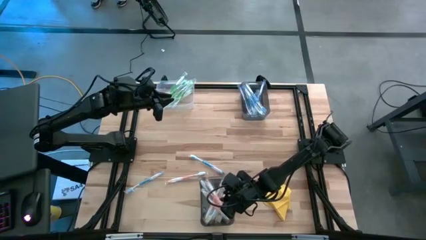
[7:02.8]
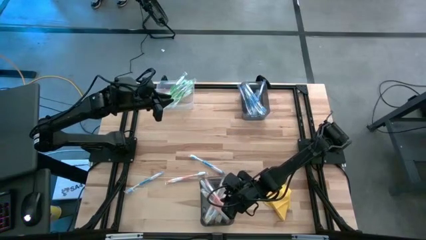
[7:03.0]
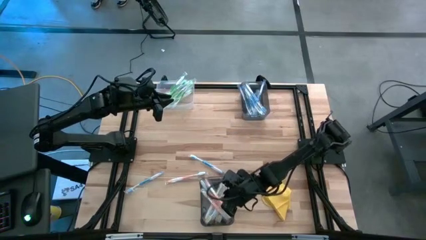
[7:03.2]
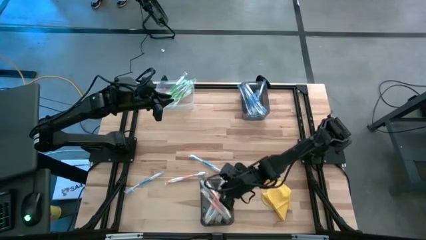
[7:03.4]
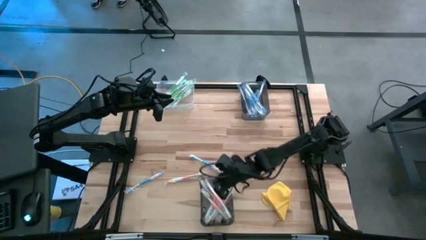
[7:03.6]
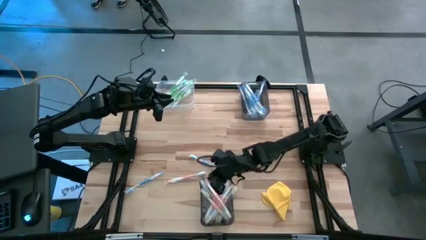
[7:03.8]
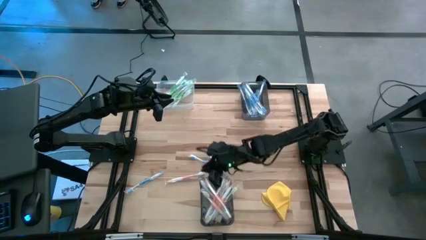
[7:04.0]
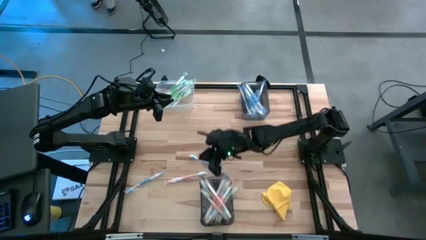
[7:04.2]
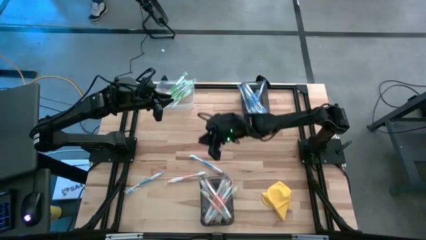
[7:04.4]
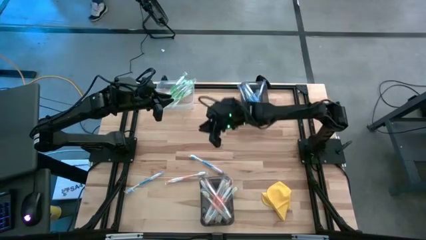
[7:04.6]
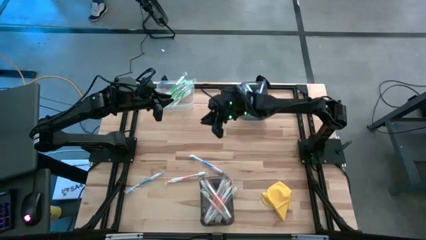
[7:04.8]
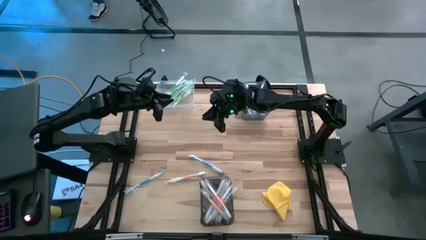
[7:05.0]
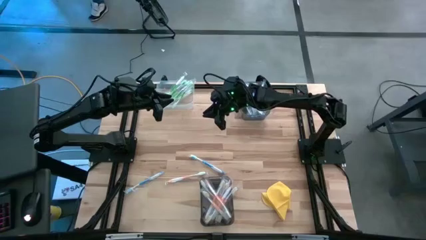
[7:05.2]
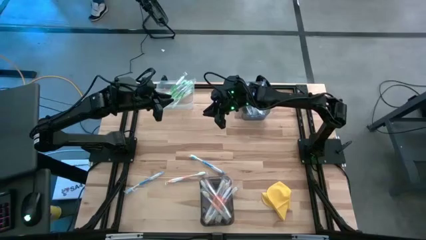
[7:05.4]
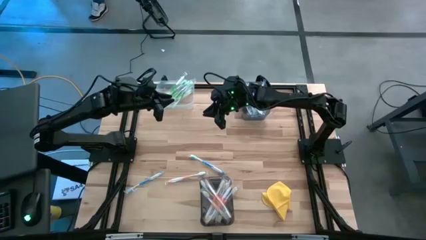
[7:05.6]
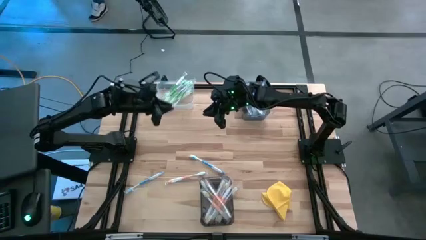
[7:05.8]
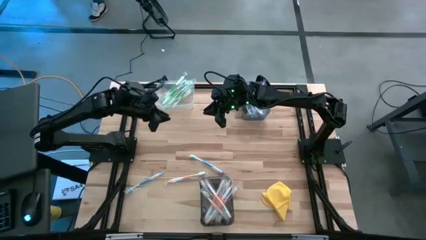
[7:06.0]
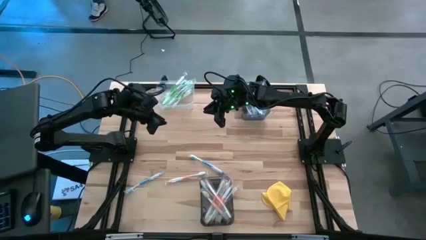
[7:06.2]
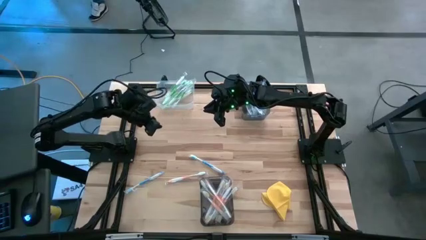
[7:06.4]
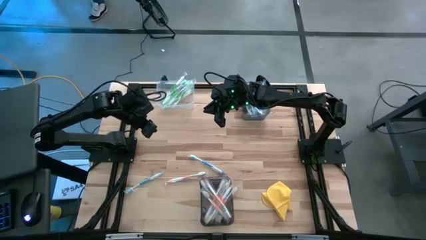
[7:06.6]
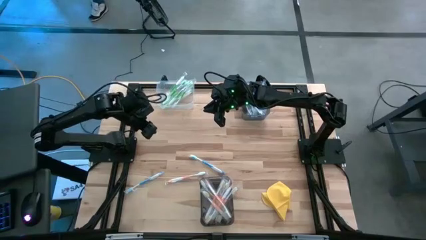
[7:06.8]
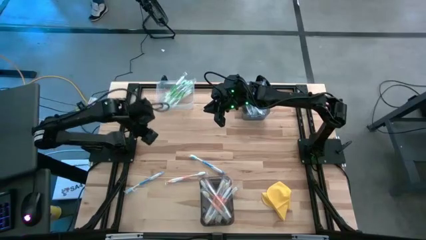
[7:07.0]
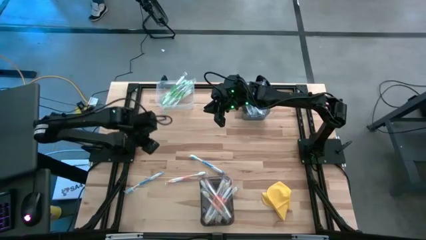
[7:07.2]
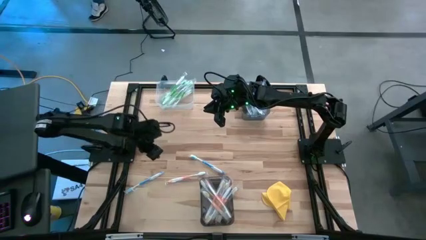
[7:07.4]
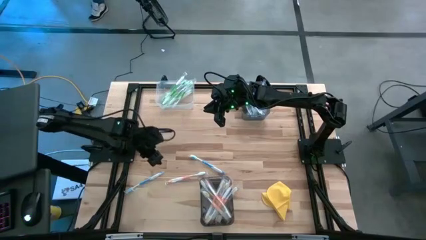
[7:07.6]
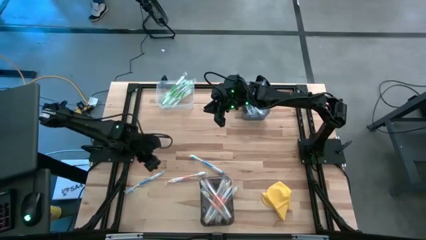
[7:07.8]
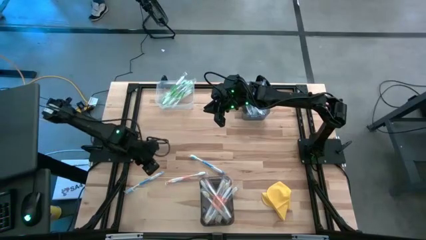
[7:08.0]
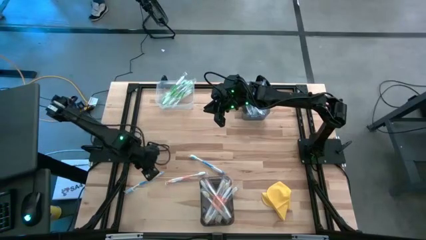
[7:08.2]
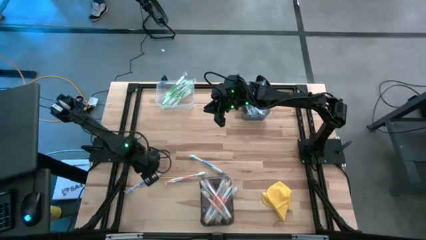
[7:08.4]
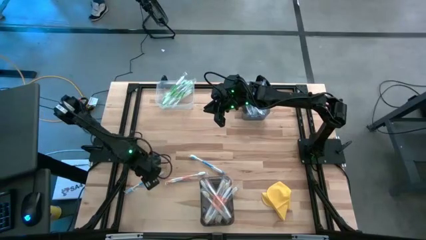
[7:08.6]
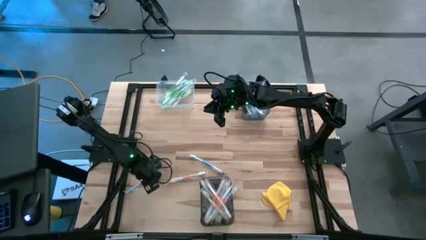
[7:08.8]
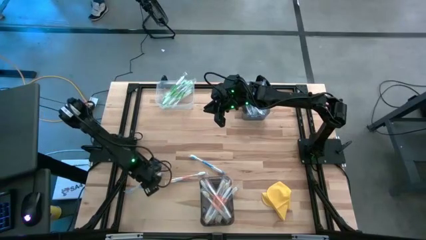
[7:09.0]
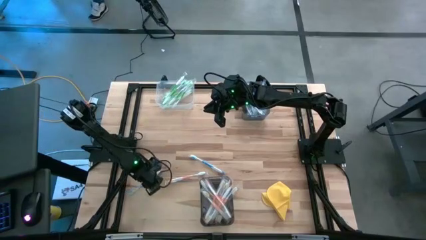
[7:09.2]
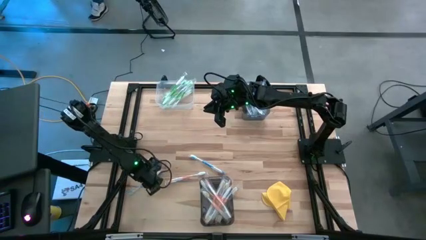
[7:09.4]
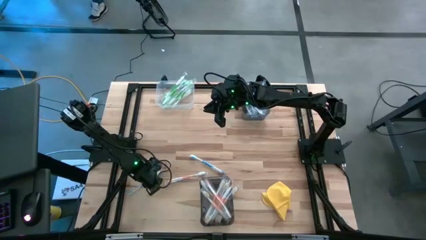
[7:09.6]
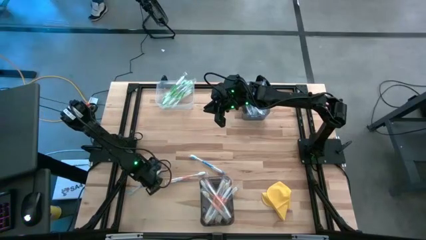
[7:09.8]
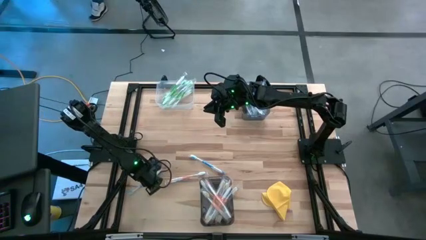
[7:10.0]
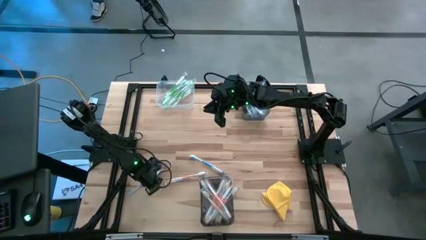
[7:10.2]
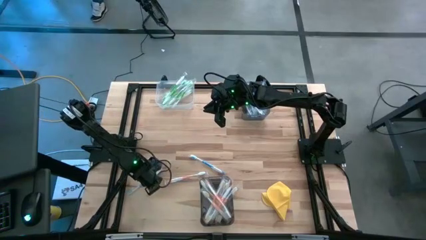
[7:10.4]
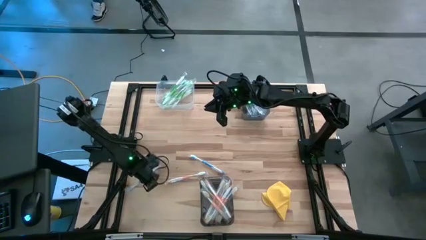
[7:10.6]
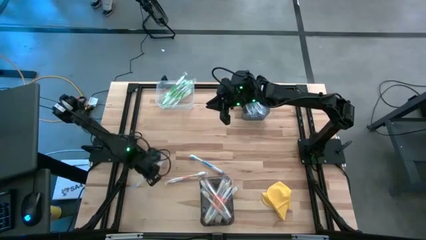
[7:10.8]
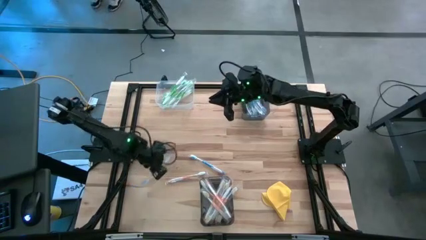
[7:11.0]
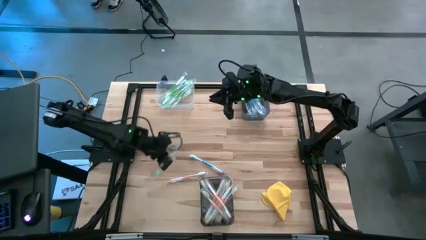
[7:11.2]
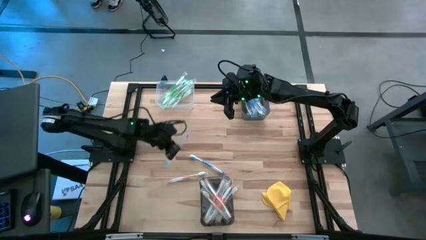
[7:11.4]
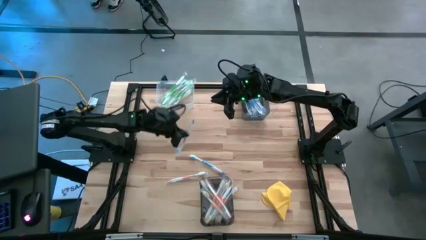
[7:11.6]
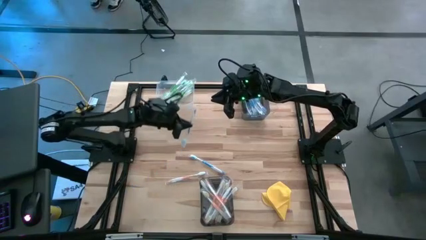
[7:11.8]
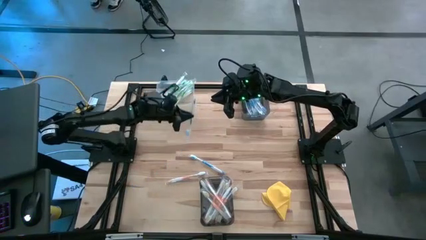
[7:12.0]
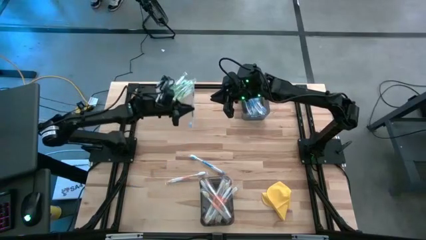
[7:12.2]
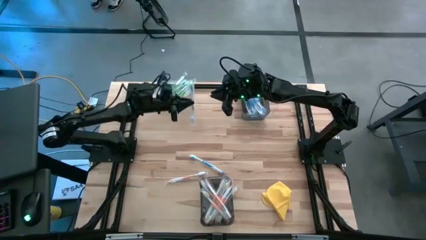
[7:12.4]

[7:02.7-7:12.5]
Task: Pick & Place Toothbrushes
Put the blue toothbrush into the top black bin

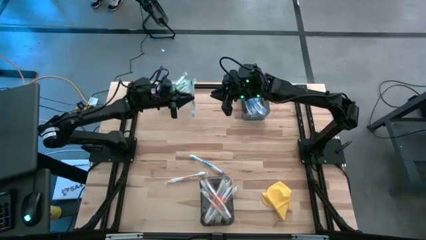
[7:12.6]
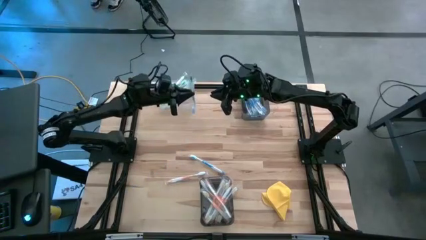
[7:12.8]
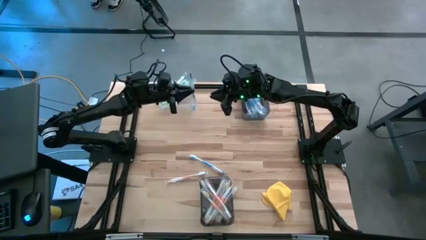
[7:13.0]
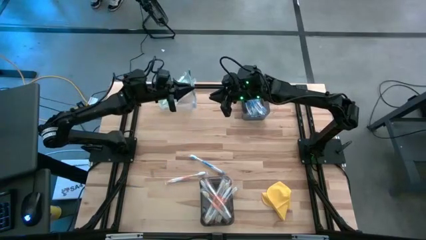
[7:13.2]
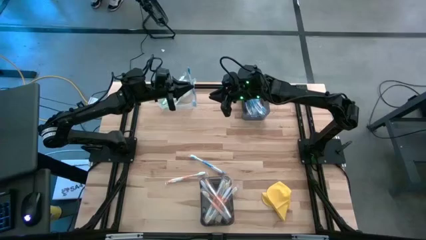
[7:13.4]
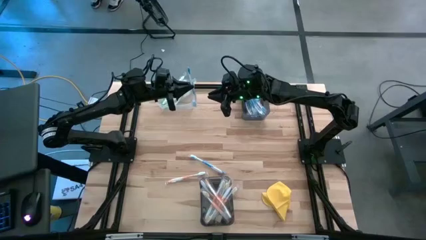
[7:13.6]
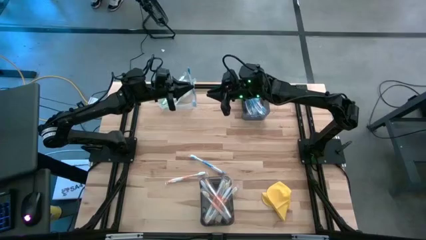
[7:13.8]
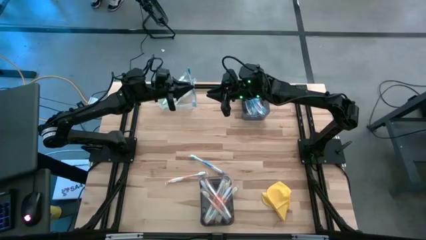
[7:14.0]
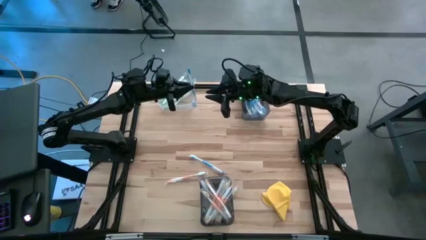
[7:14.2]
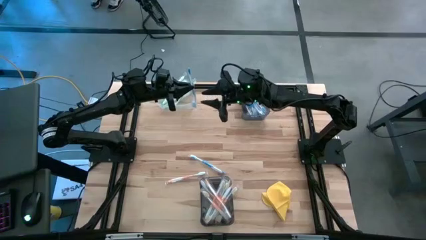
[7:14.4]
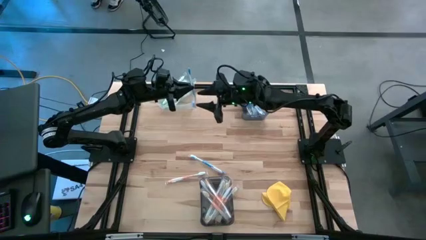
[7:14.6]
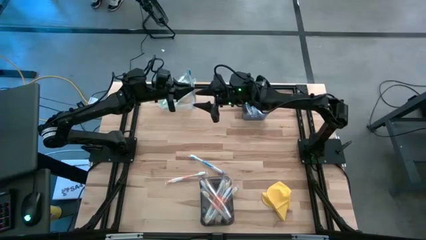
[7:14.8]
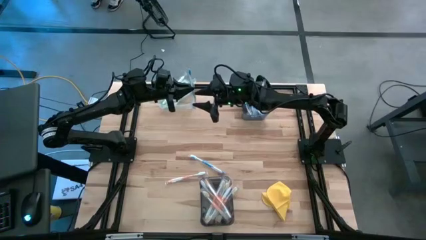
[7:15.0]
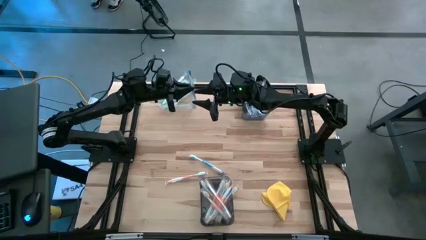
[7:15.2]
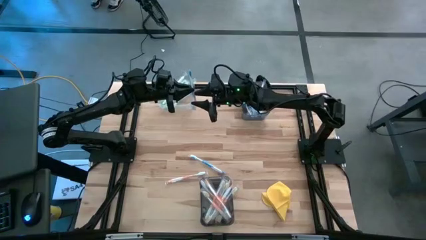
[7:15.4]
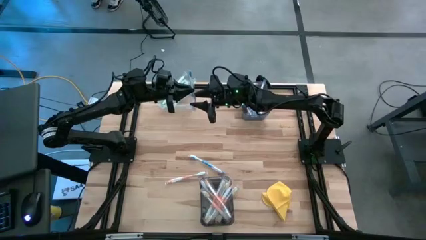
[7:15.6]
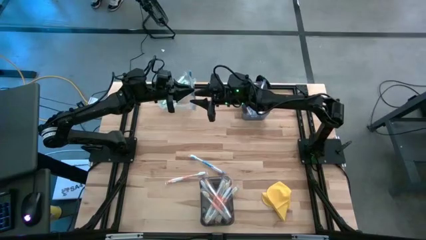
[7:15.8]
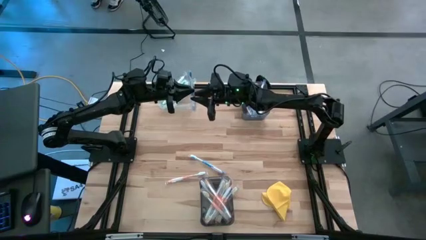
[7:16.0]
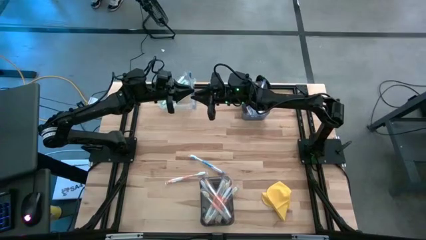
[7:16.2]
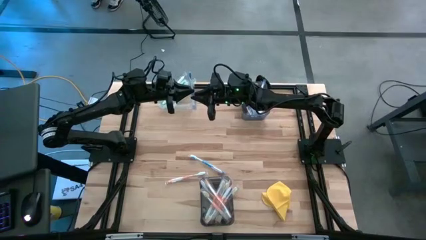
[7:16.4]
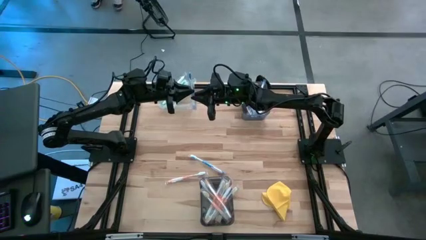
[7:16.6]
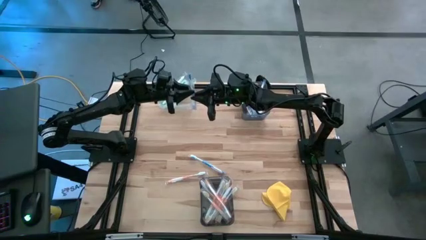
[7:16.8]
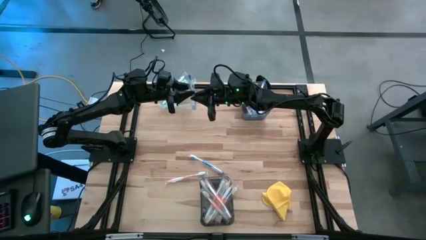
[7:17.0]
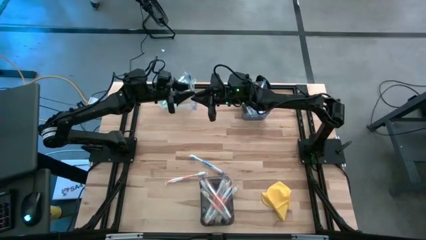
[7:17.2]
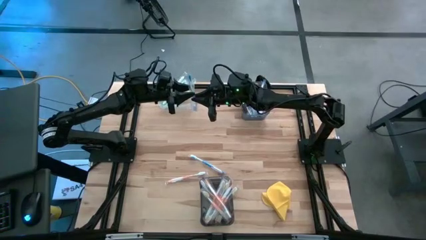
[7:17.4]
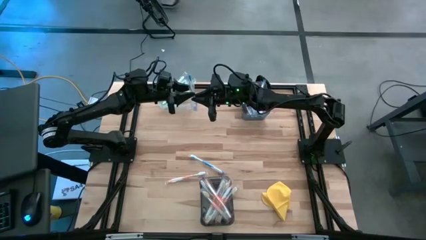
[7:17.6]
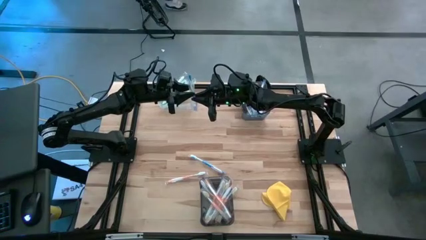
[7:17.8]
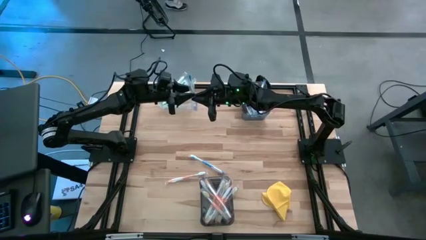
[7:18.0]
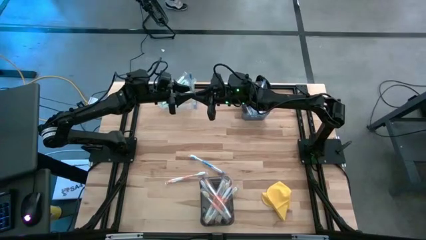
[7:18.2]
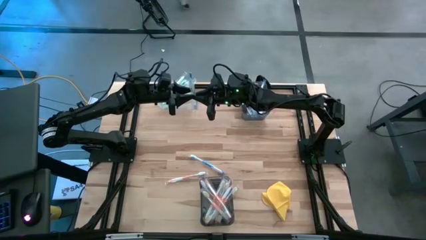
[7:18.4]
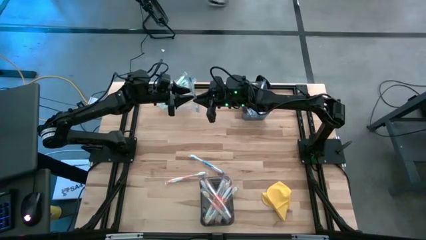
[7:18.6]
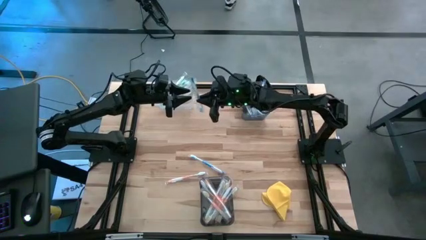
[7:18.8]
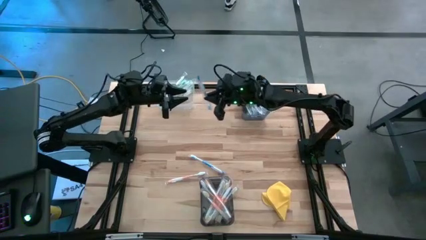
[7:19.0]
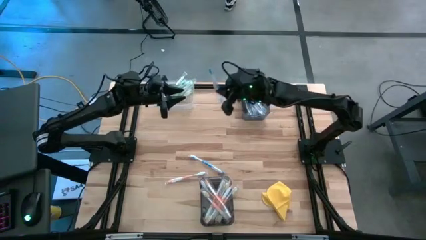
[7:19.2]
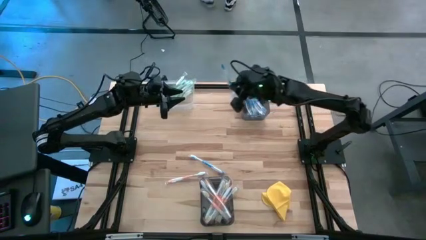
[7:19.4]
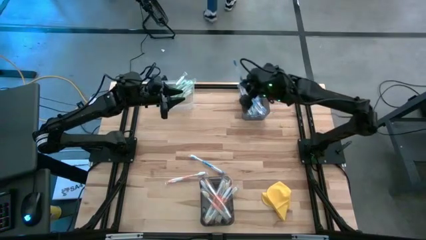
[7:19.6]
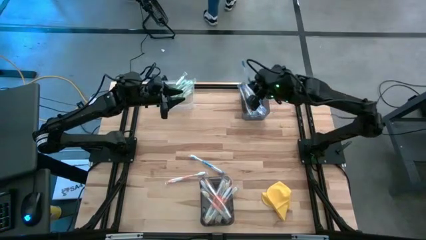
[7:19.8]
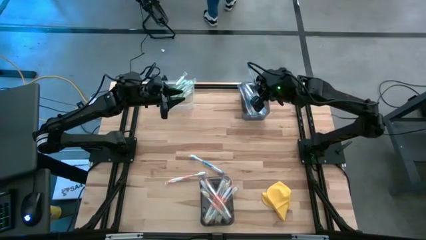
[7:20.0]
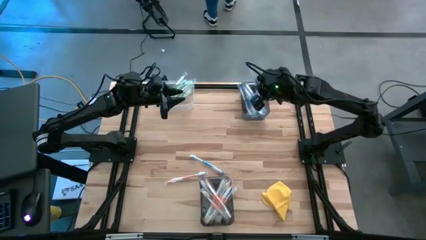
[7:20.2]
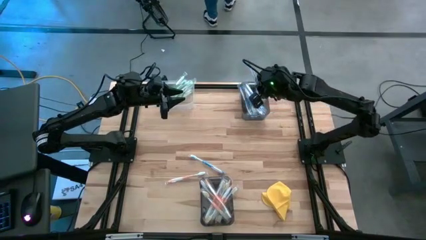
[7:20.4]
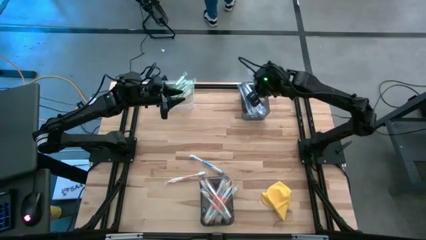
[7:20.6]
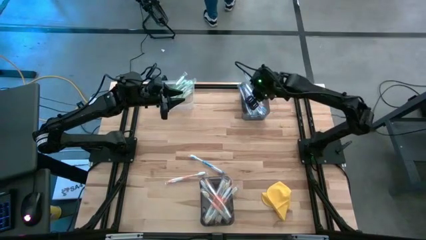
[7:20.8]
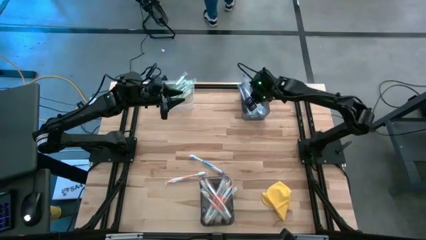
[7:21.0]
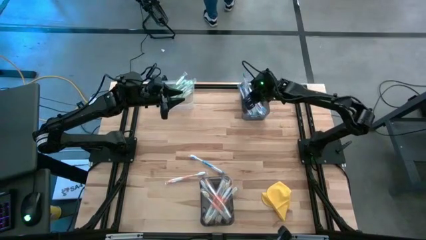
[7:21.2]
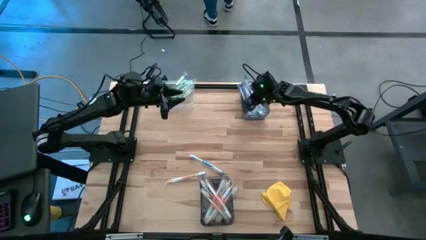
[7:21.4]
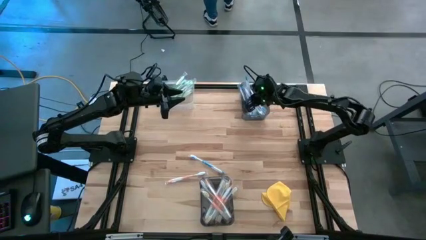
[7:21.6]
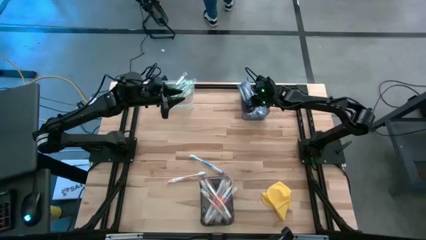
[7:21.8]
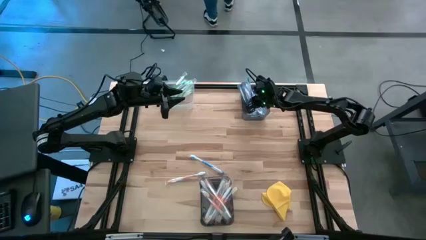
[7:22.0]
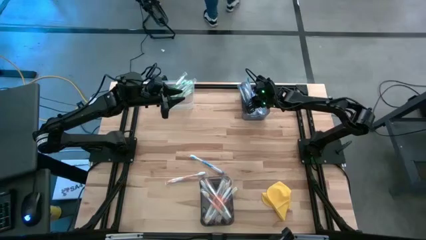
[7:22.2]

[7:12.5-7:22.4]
Put the blue toothbrush into the top black bin
